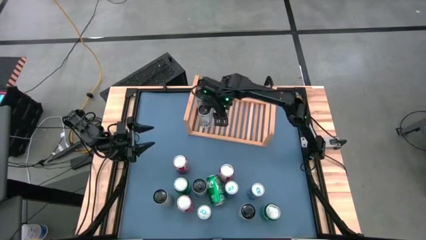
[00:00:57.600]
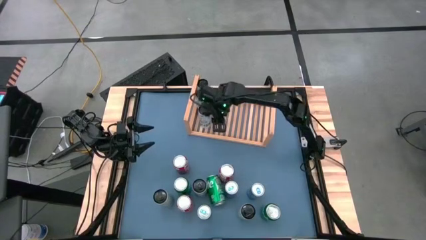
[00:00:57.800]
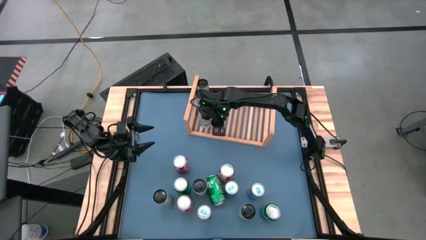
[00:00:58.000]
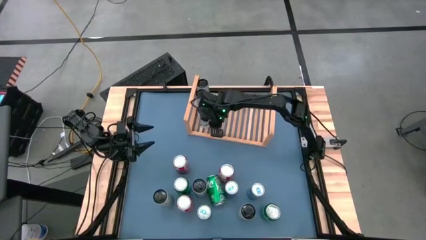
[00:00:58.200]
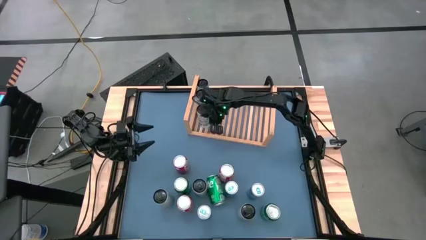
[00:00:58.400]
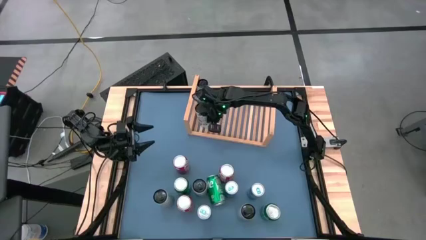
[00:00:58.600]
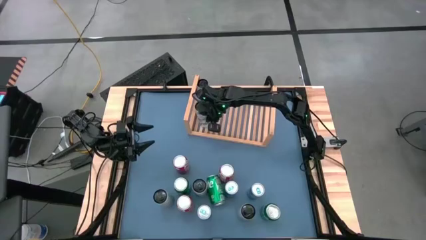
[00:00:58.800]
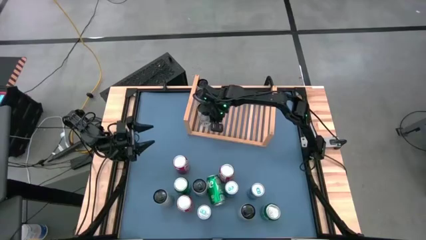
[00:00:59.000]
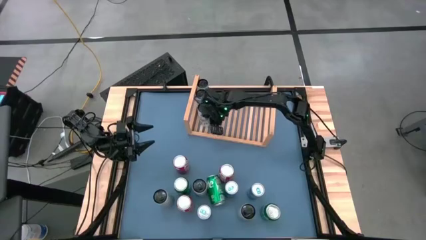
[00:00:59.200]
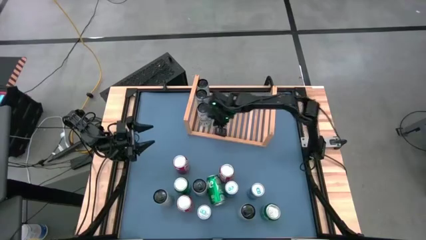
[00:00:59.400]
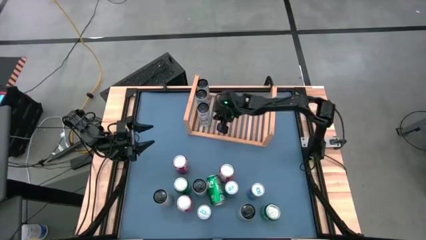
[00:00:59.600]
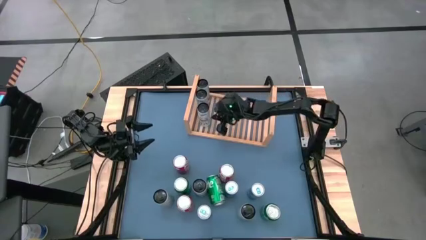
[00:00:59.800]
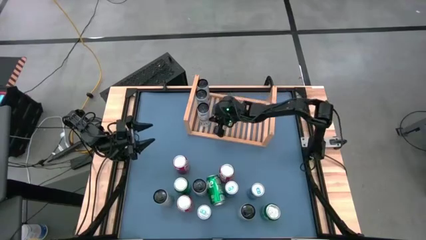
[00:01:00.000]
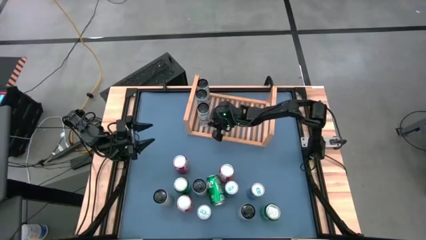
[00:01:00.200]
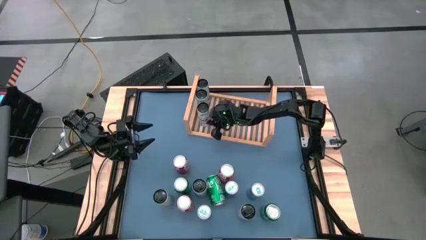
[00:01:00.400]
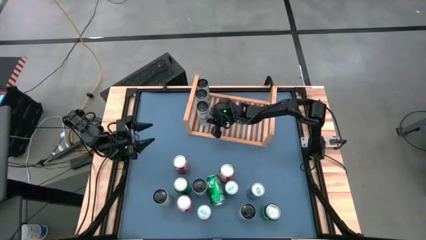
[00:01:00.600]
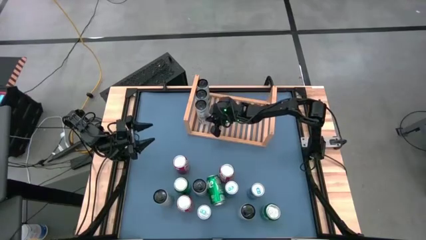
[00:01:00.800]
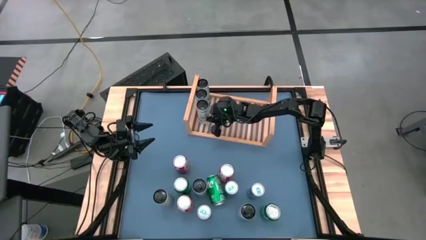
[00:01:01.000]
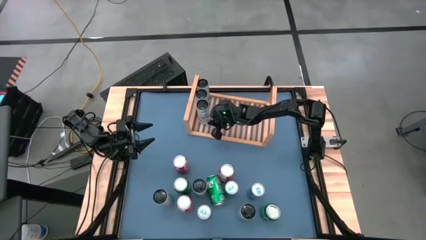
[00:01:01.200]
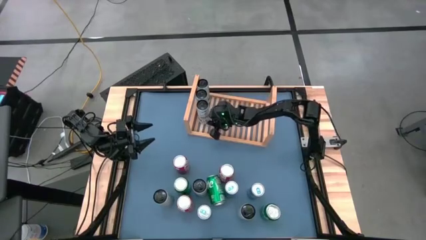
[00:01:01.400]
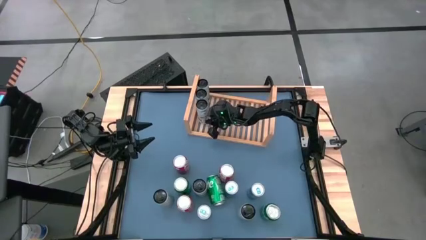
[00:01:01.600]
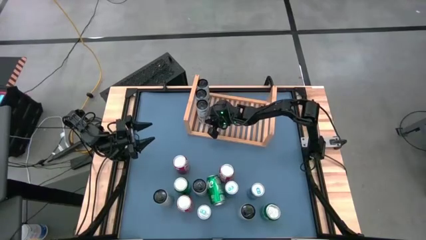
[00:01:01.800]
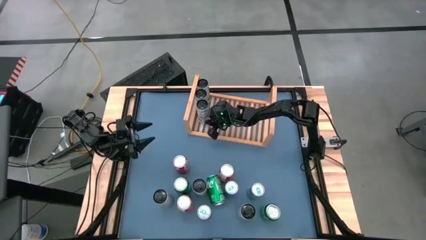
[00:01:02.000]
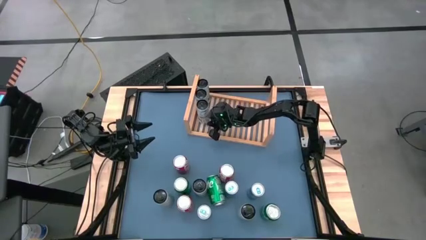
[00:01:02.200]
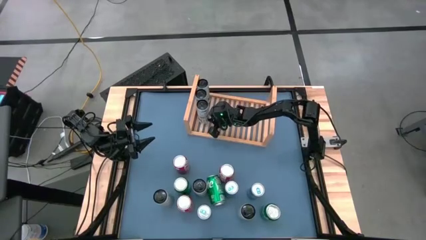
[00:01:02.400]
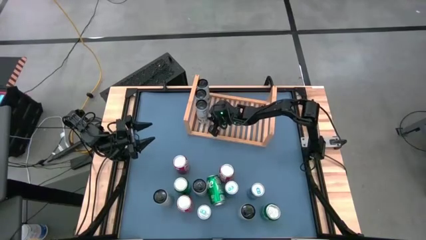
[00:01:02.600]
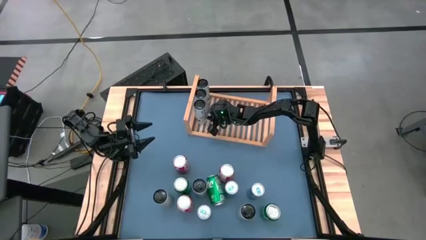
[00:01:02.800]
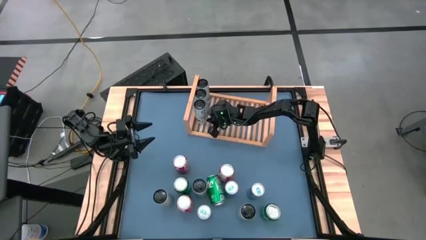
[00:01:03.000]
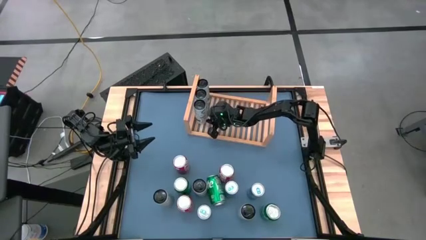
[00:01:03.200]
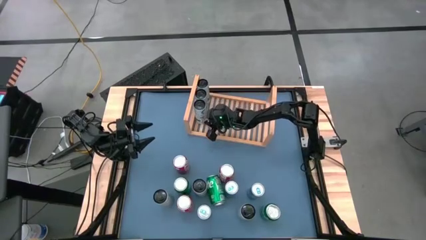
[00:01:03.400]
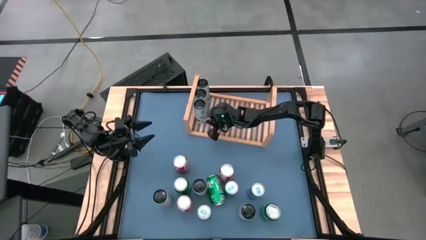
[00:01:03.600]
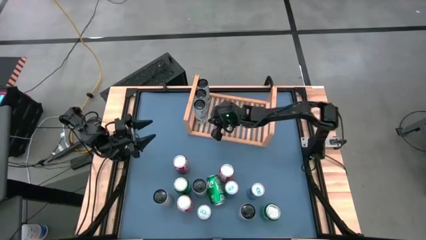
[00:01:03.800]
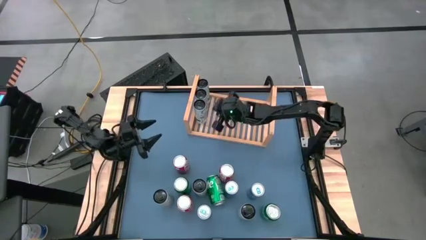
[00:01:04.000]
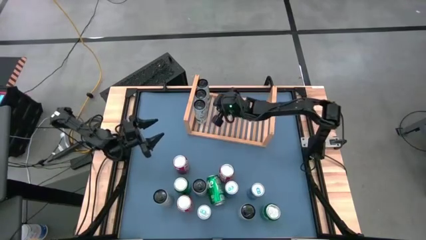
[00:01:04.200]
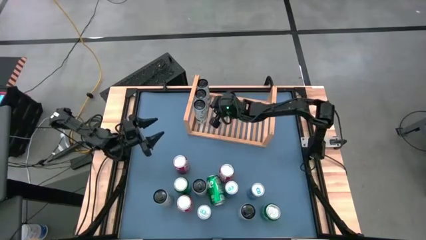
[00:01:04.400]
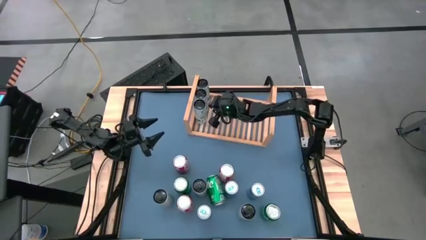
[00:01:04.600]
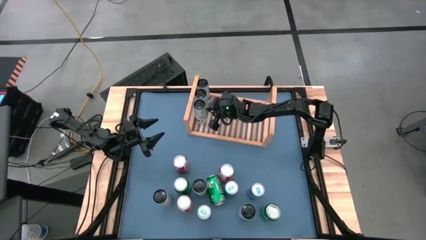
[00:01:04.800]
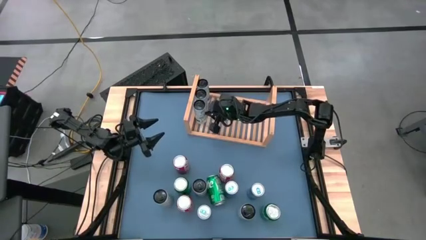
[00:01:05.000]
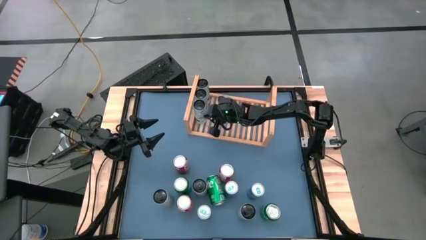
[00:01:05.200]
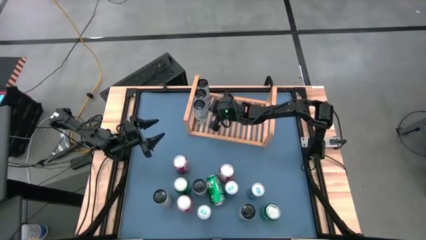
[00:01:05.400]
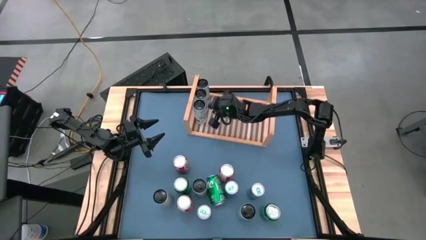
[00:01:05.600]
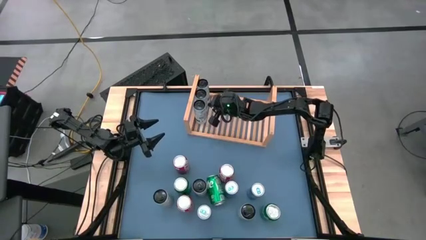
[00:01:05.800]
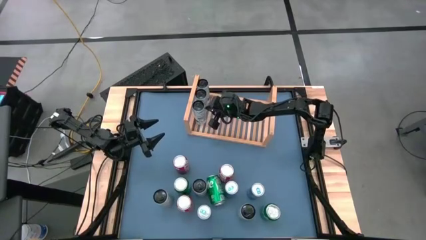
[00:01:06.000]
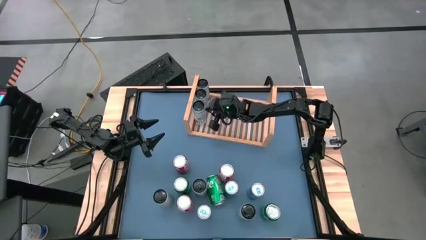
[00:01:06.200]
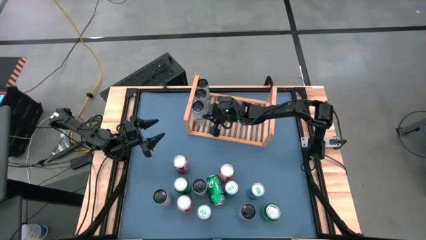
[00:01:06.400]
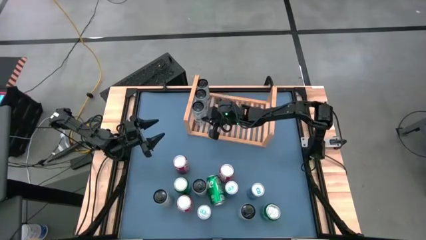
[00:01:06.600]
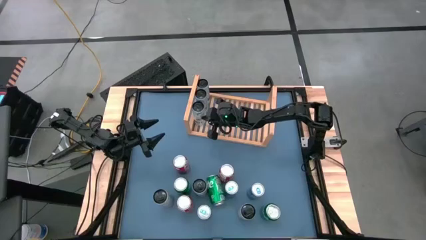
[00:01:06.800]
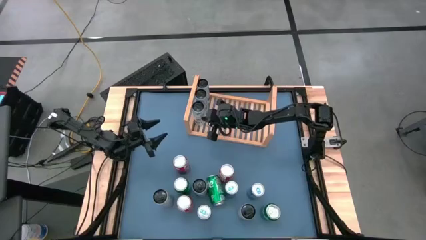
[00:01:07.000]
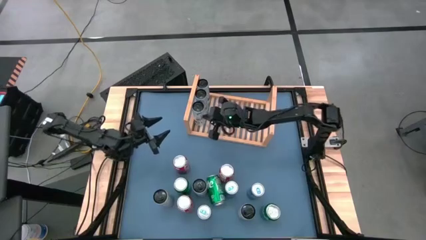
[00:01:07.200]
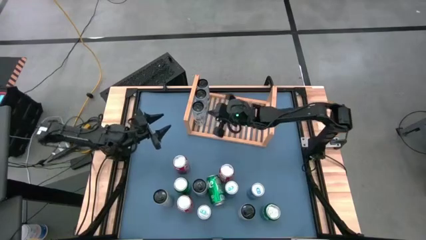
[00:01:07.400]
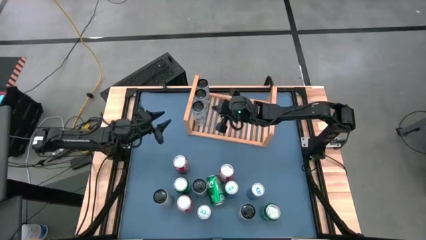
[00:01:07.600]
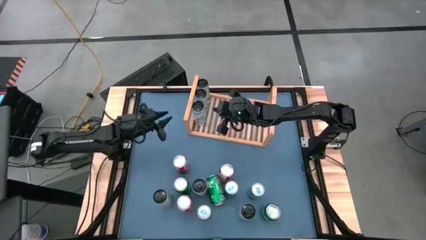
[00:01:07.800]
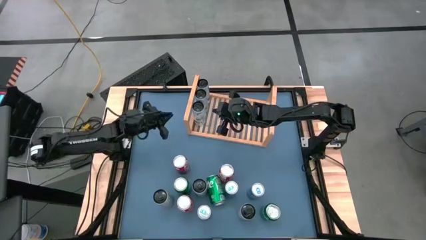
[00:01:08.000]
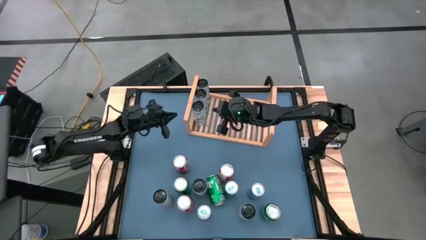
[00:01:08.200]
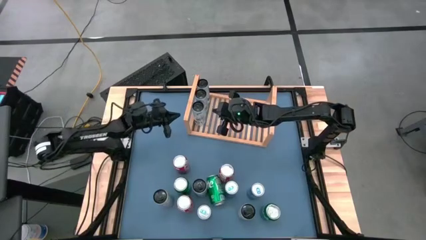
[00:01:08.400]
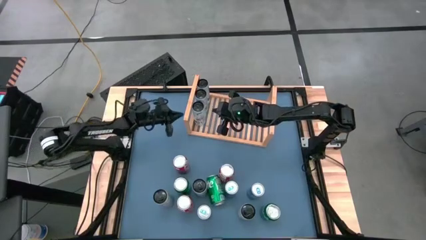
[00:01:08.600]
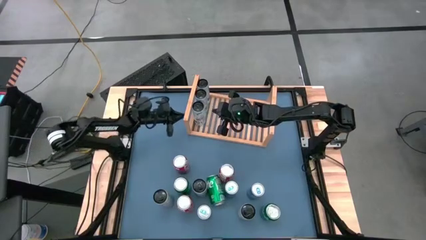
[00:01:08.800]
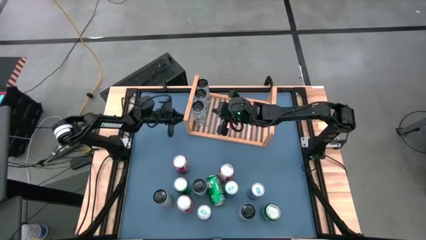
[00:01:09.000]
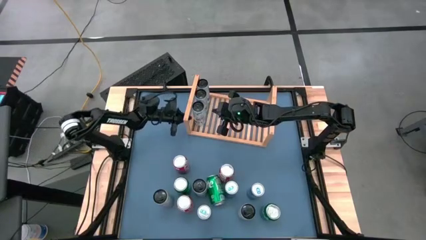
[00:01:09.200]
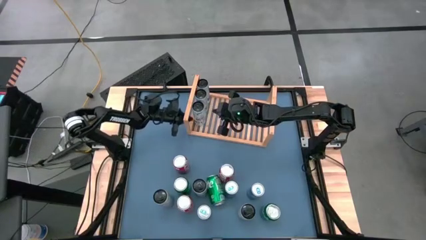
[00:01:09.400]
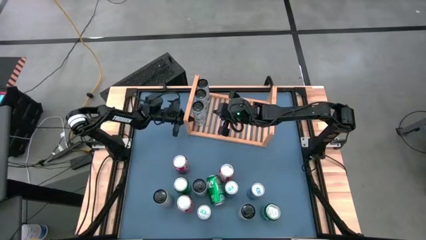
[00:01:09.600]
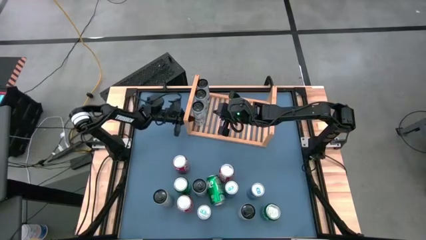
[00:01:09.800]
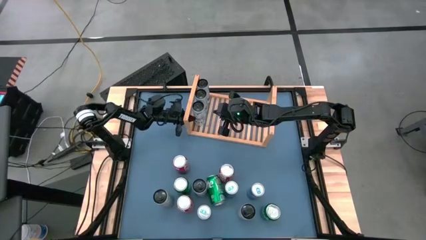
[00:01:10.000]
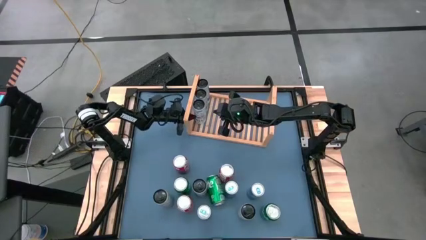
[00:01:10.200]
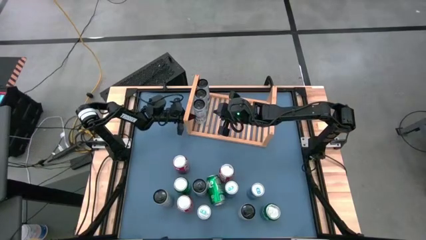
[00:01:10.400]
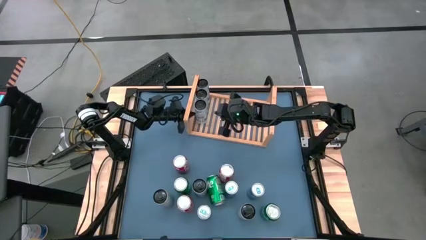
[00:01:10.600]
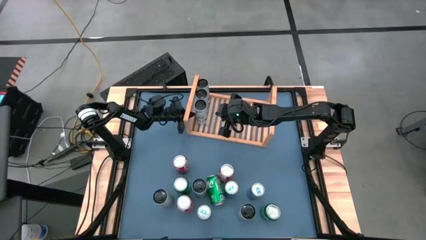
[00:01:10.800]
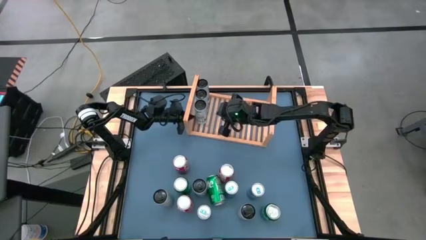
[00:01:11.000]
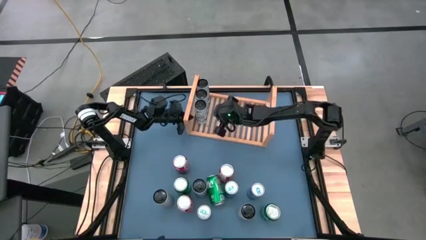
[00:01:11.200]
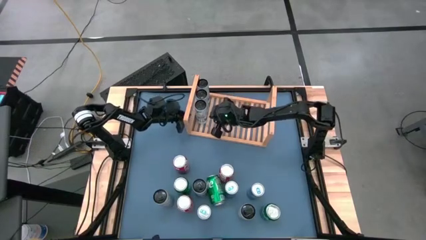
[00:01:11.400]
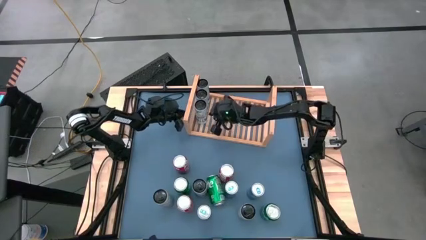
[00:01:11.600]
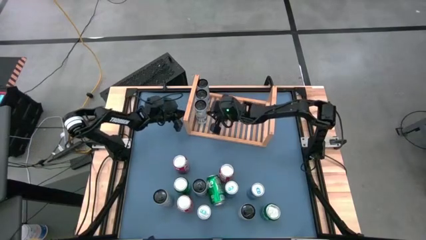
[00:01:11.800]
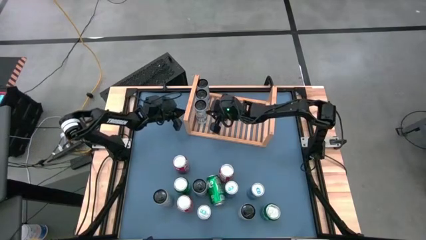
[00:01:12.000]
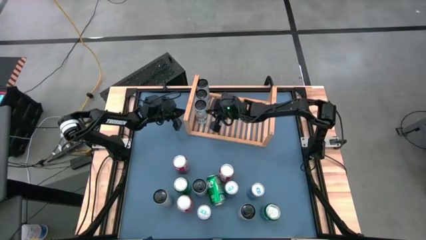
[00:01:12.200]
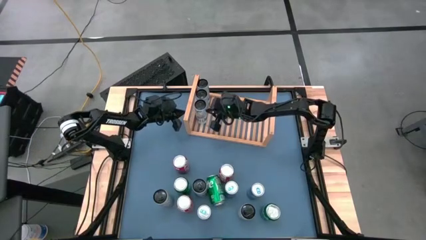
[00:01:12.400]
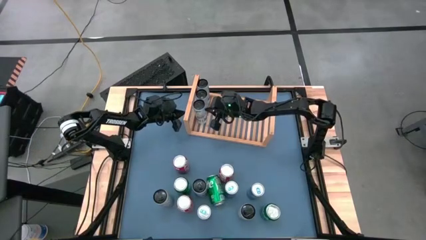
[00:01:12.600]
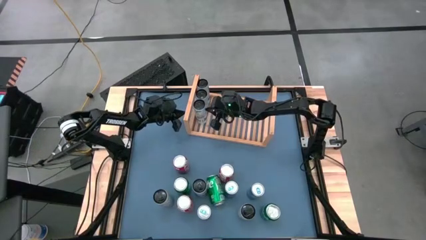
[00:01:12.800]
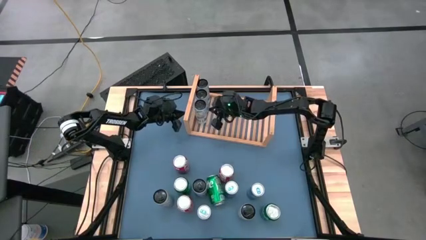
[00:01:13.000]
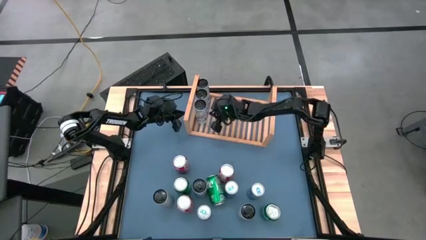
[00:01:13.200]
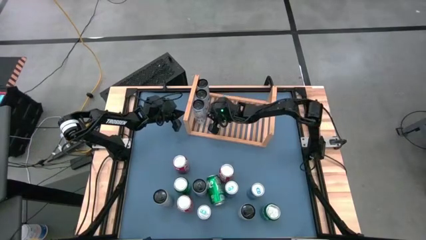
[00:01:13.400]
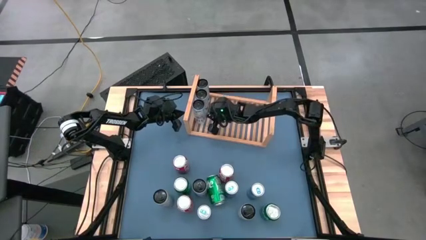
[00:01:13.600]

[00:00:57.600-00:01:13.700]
Task: Place canned beverage on shelf
Put the white blue soda can on the shelf aligned with the other white blue soda can

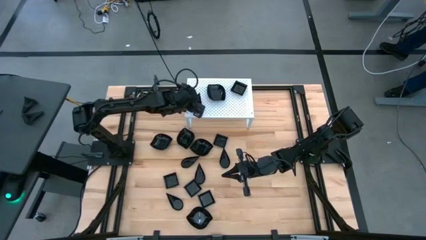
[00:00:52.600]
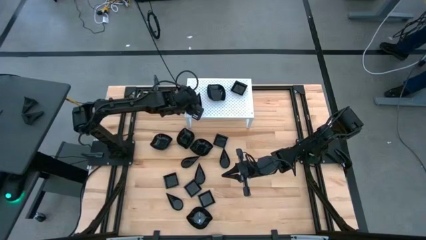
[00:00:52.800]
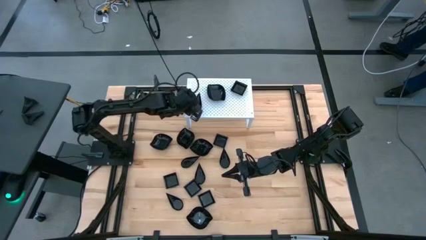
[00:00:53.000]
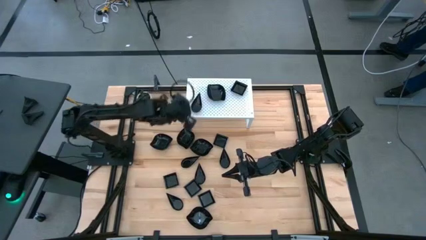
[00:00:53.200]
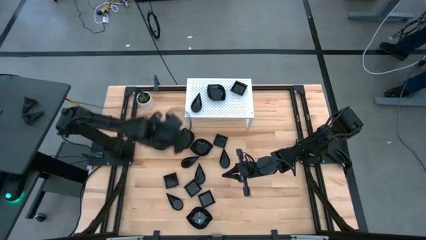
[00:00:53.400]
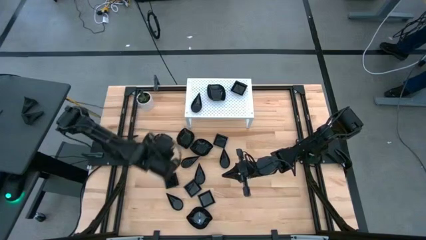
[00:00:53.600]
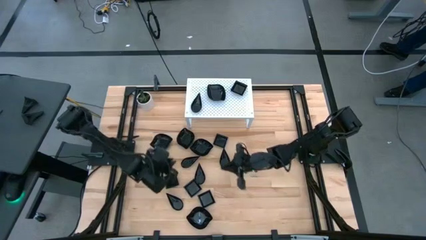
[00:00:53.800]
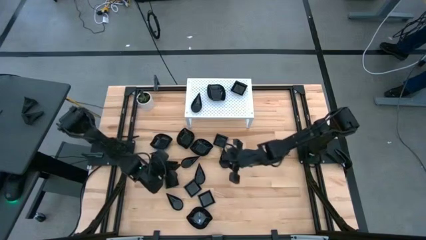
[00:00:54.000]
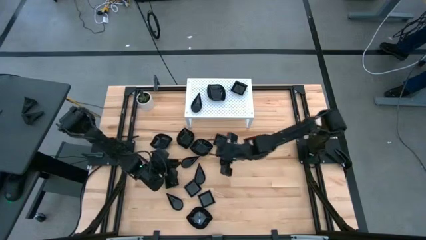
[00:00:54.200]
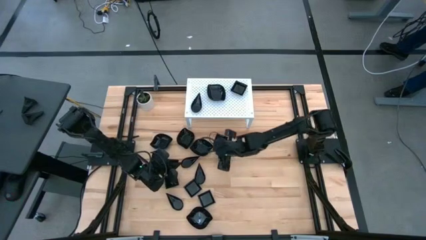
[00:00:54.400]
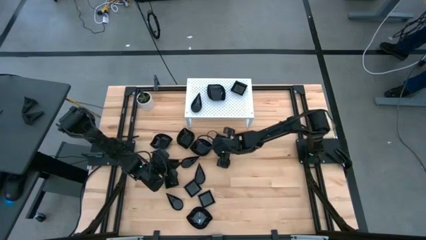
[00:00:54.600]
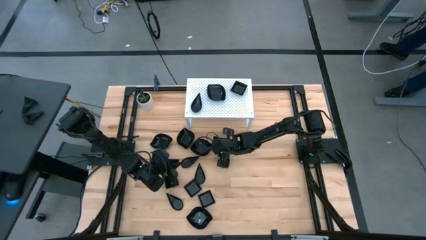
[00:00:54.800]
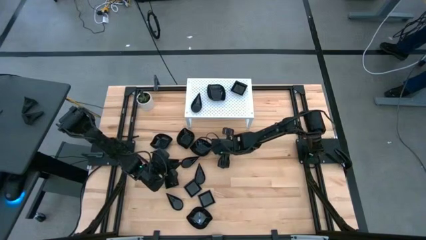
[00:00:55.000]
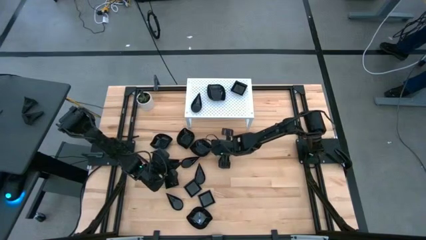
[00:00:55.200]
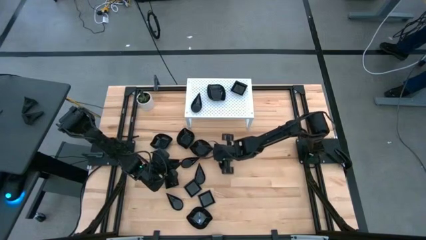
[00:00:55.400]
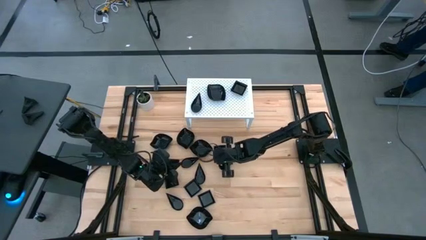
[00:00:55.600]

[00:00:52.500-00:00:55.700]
Task: Pick & Place Mini shaped plates
Stack the black square plate on top of the other black square plate on the shelf
